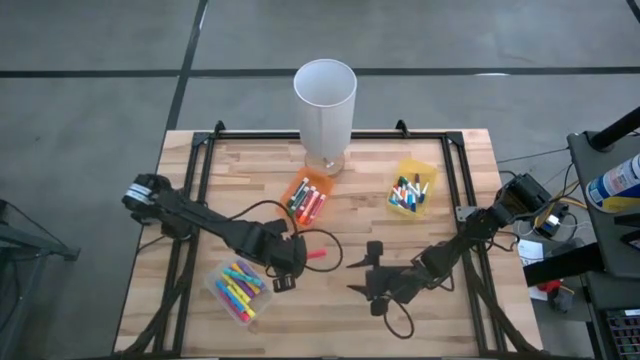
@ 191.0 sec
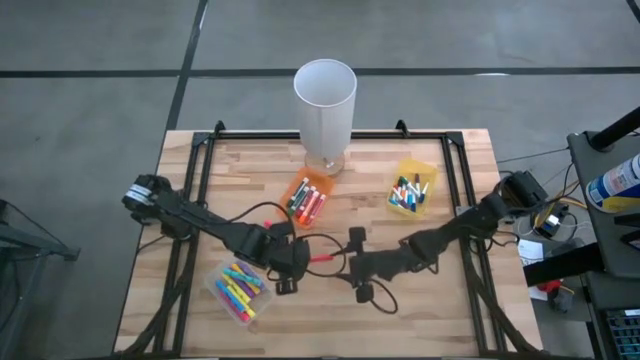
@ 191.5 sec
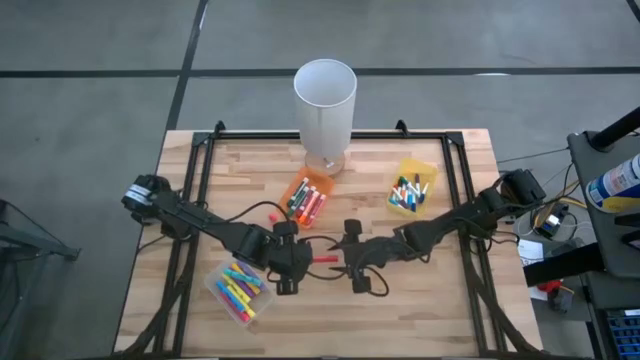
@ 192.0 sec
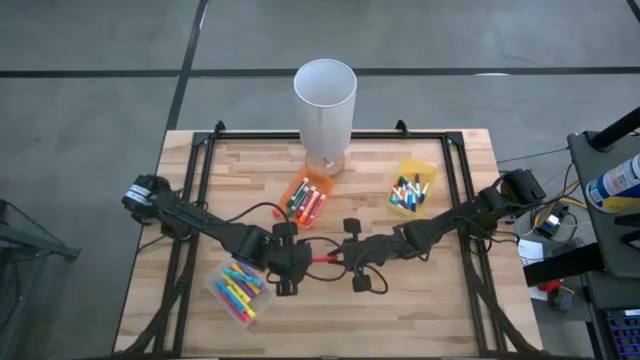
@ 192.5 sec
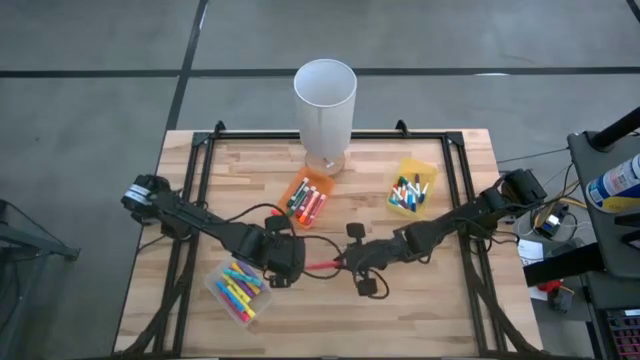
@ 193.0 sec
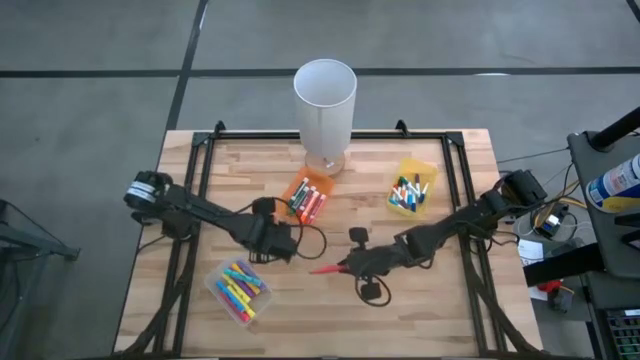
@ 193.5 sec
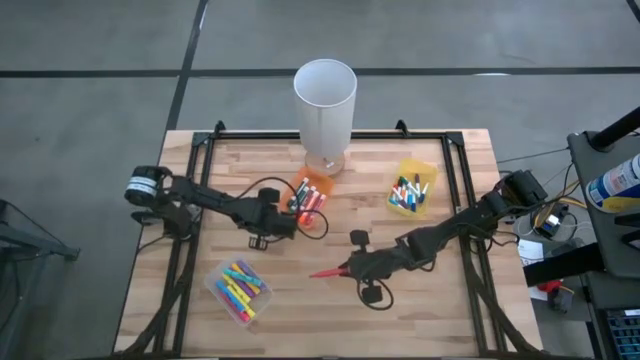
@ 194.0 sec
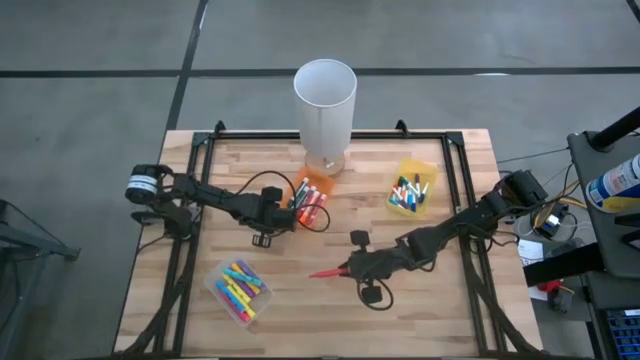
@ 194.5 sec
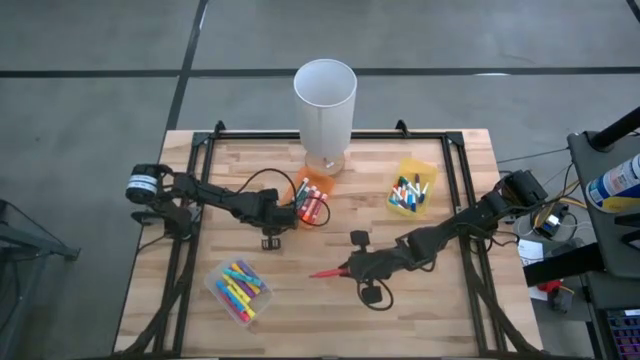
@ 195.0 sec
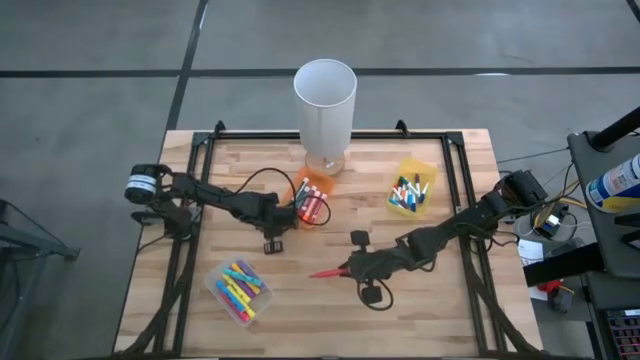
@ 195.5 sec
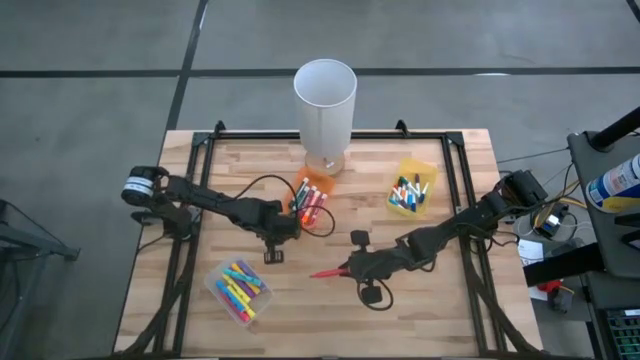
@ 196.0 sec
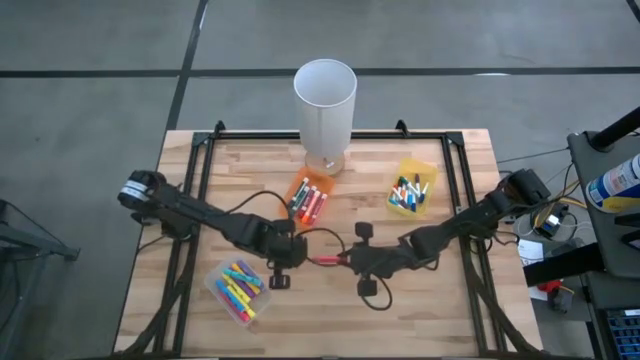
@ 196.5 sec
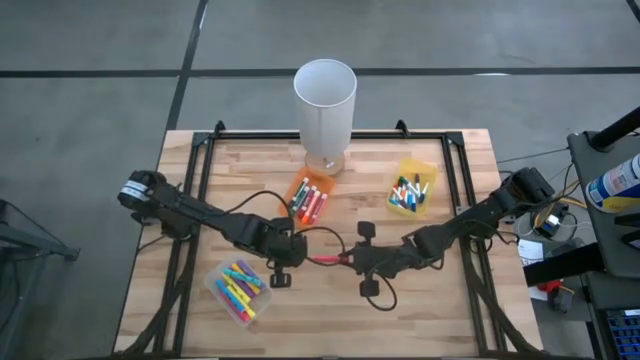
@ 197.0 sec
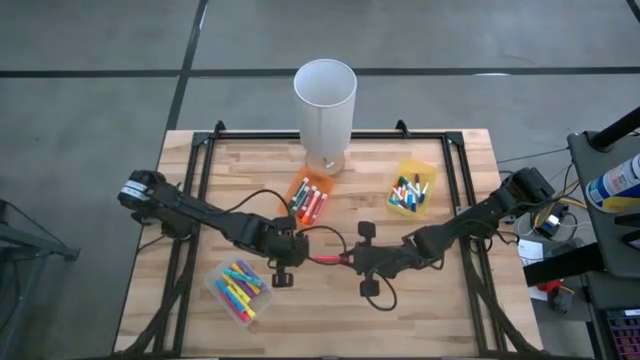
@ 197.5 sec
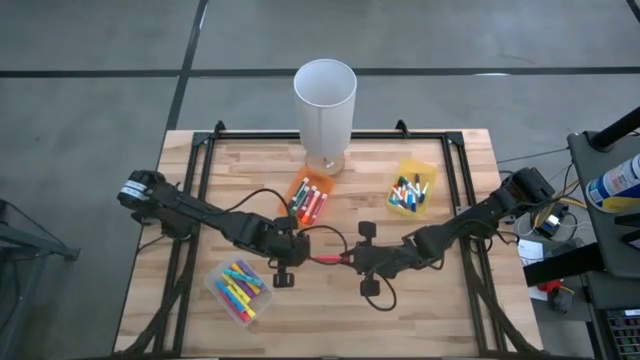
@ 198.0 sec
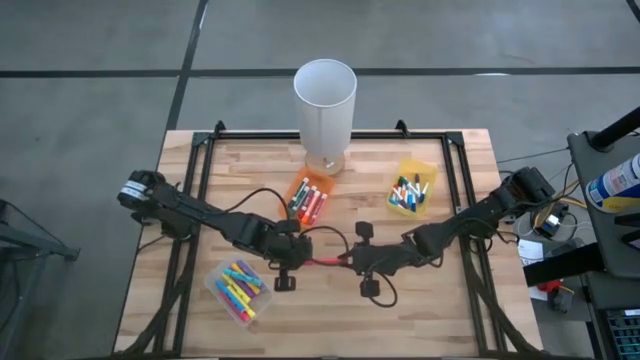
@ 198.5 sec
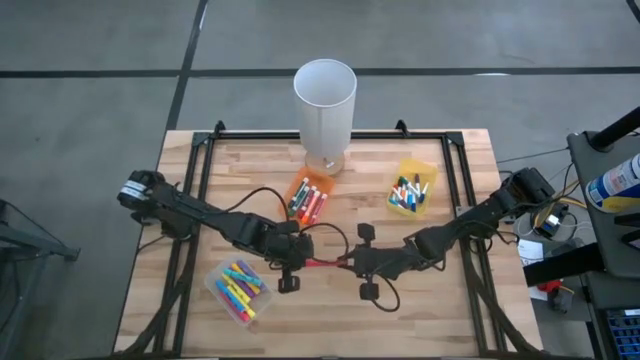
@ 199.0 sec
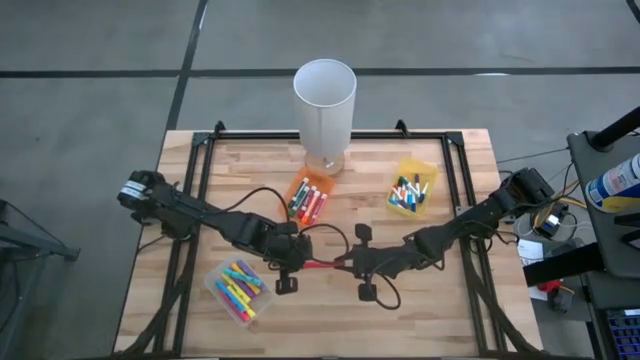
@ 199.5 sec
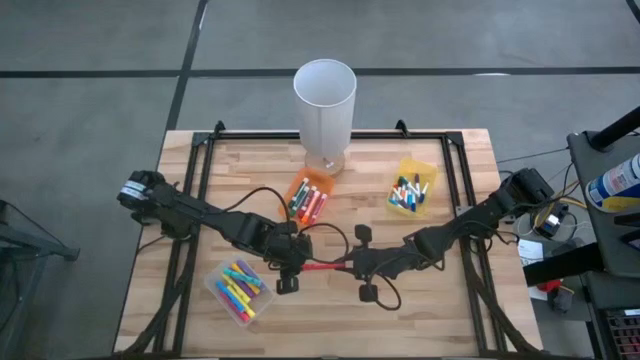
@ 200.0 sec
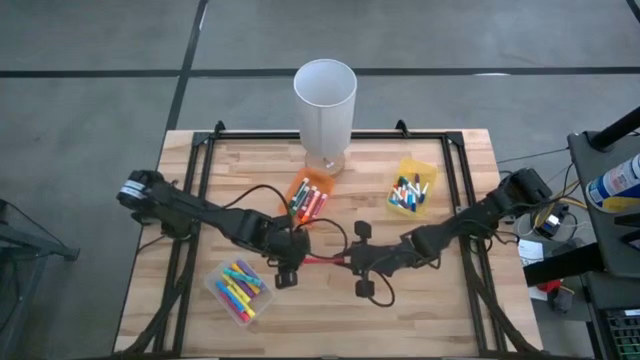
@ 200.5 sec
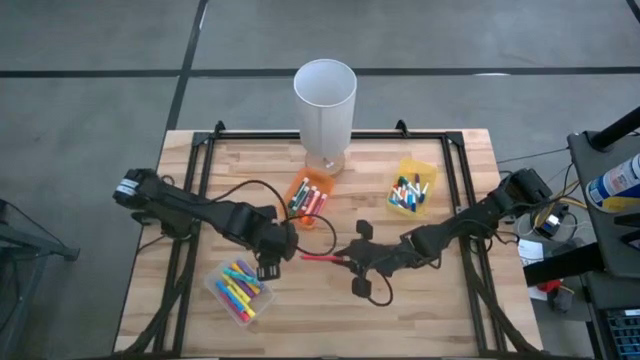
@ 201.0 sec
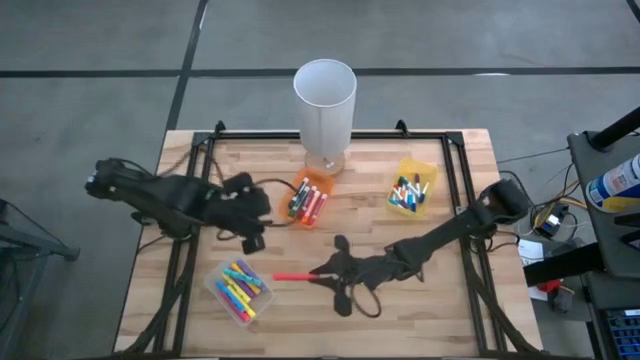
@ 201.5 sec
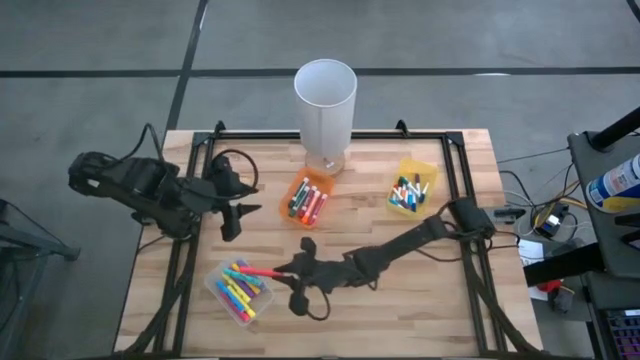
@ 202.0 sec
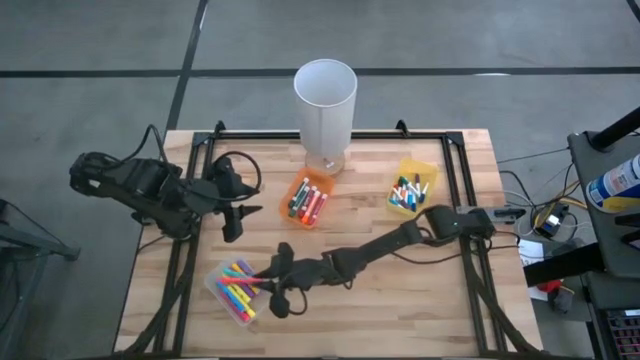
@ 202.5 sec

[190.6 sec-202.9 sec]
Task: Pick & Place Markers
Put the dark pink highlighter pen into the white bin

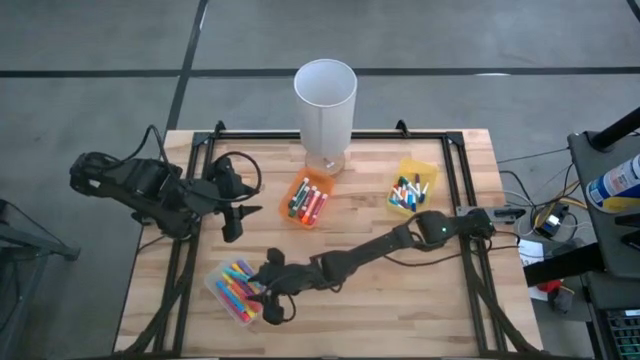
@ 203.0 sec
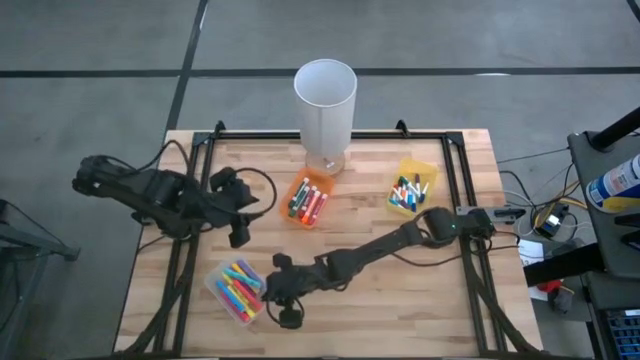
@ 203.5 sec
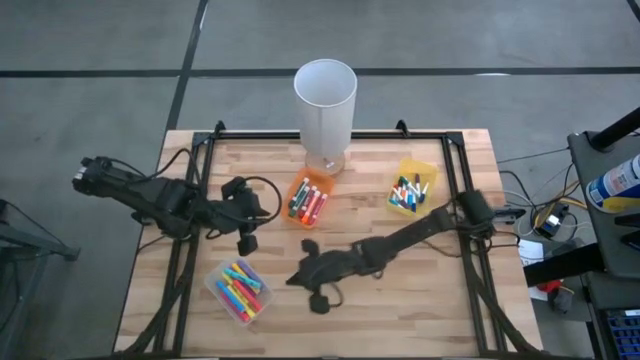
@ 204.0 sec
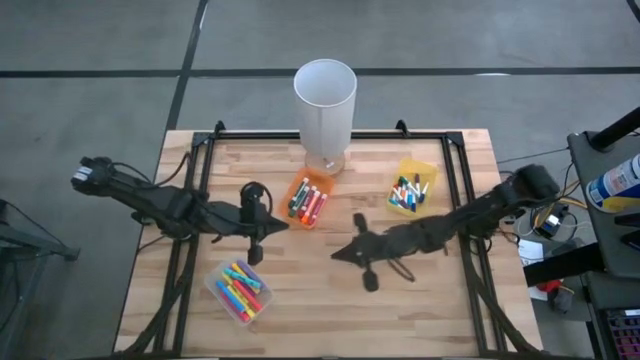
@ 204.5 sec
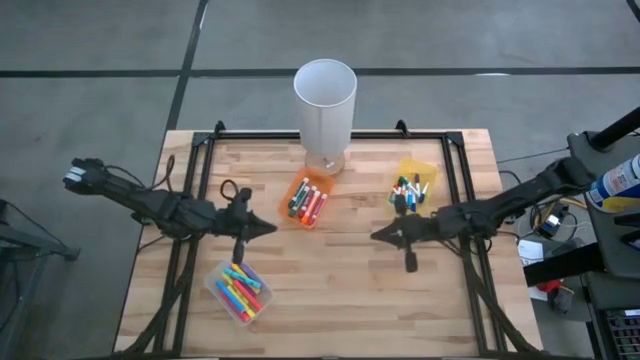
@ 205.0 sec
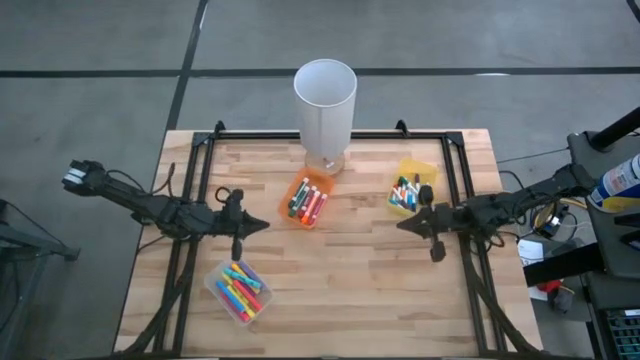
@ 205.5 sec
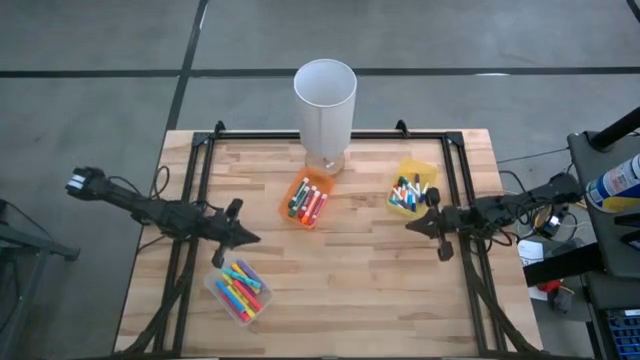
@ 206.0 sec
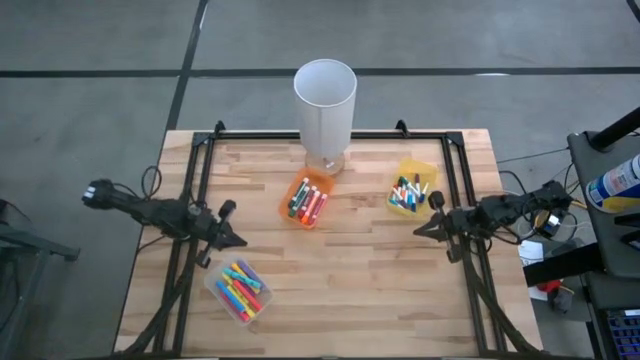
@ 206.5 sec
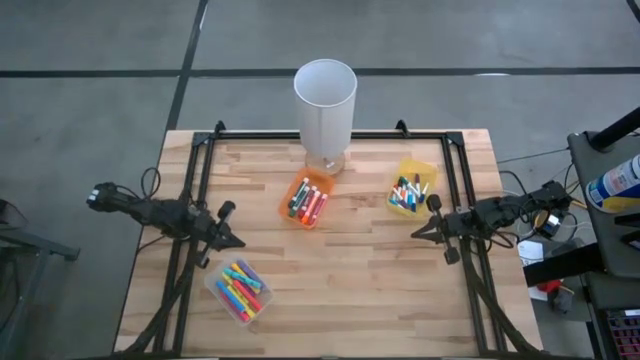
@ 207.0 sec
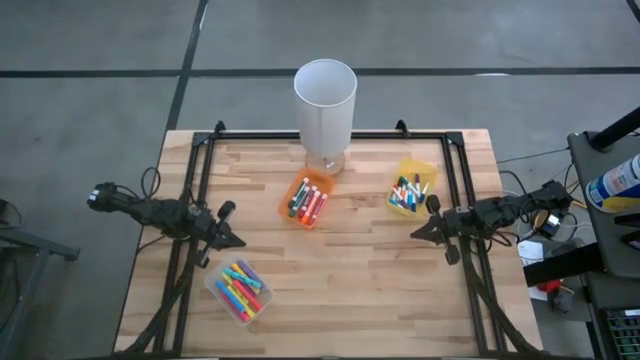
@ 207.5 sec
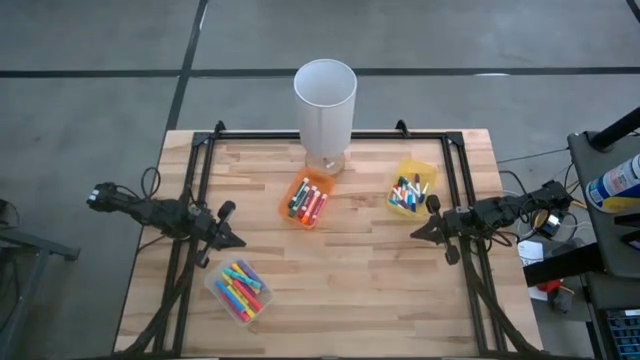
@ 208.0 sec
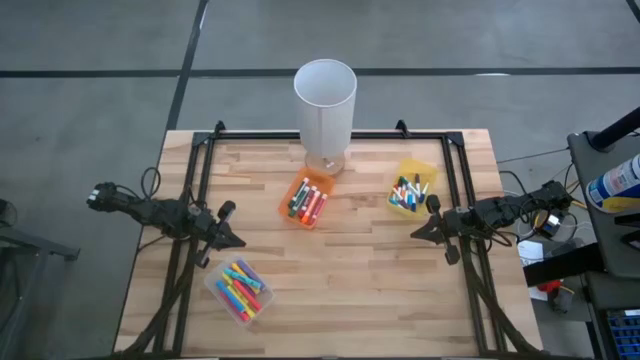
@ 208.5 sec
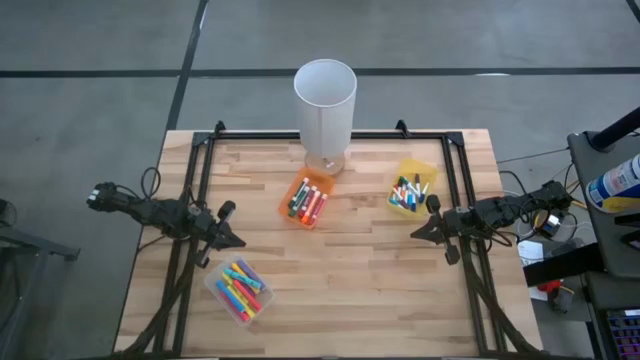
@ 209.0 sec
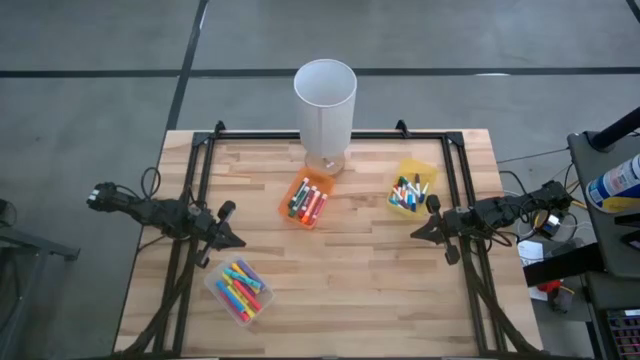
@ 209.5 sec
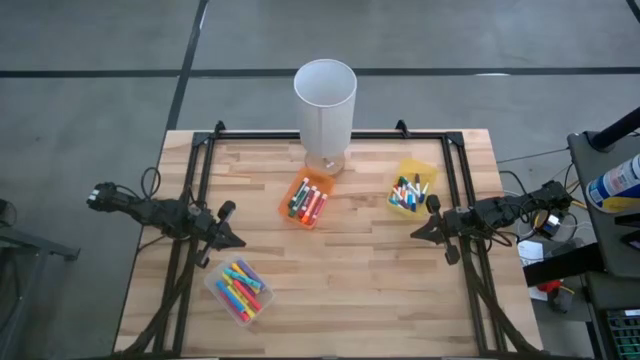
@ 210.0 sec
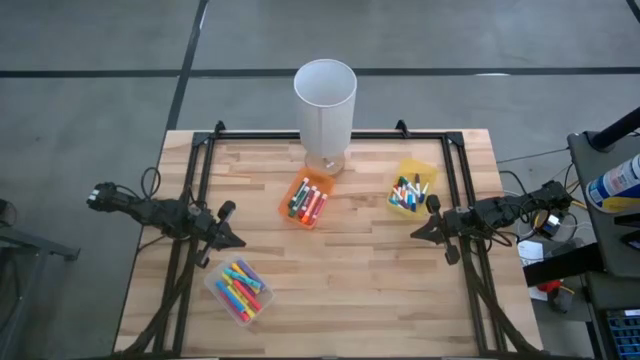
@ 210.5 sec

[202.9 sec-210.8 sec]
Return to Home Position
